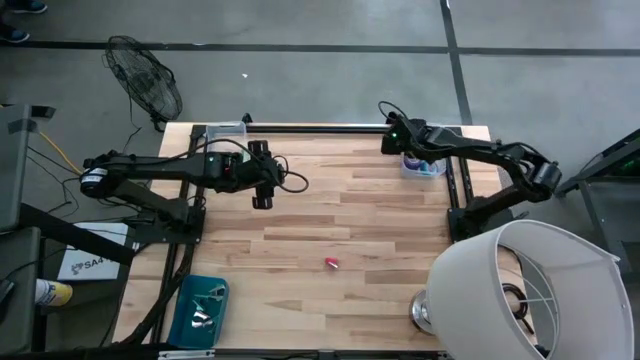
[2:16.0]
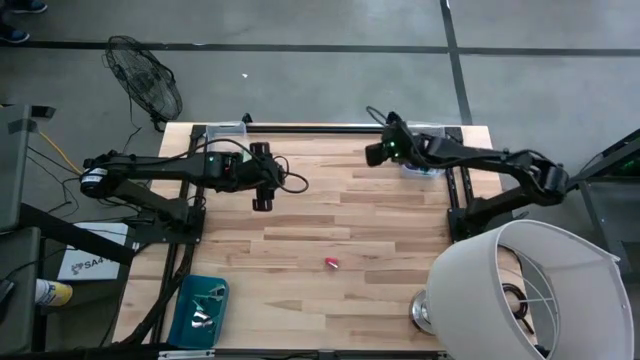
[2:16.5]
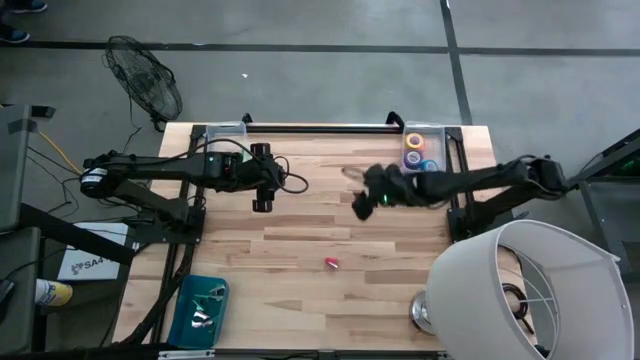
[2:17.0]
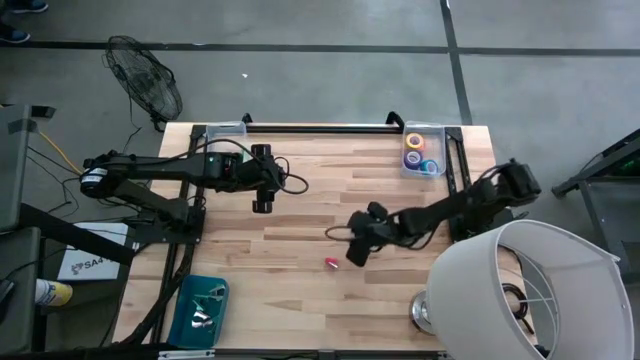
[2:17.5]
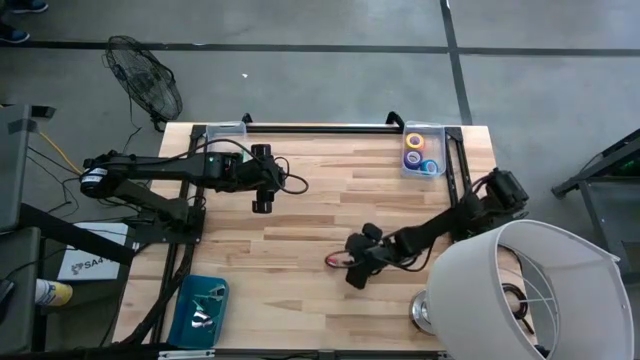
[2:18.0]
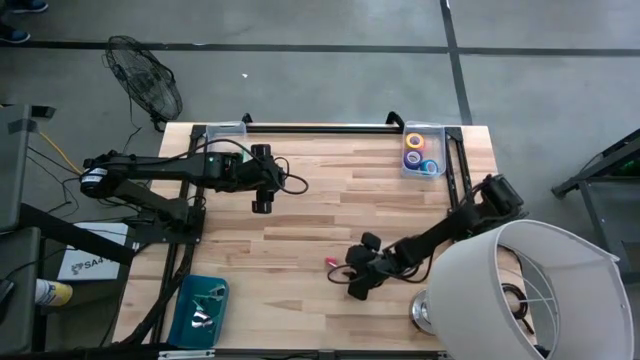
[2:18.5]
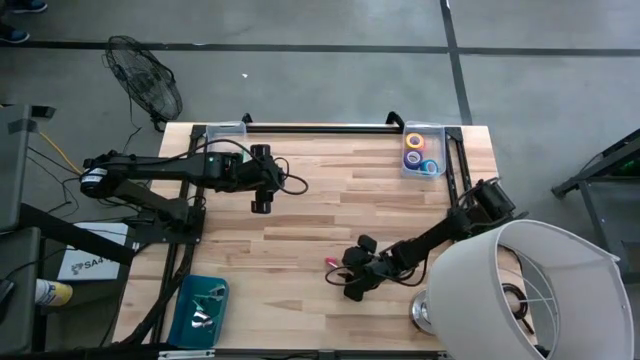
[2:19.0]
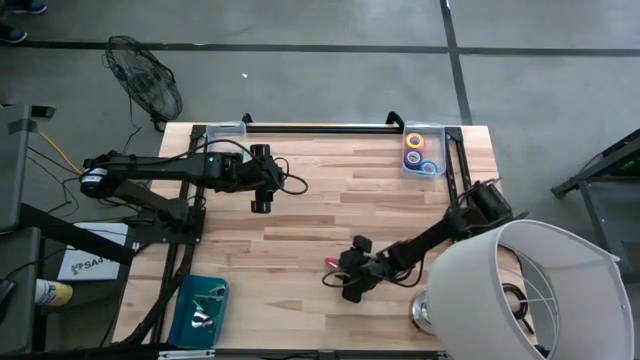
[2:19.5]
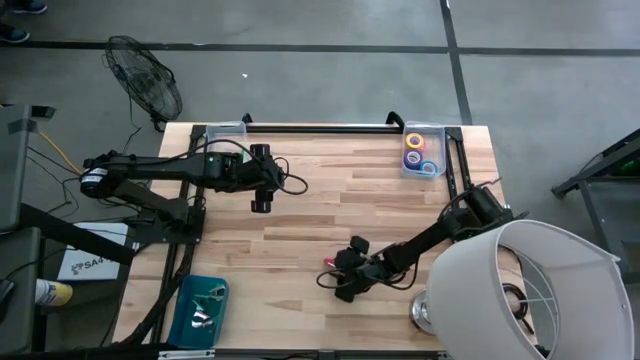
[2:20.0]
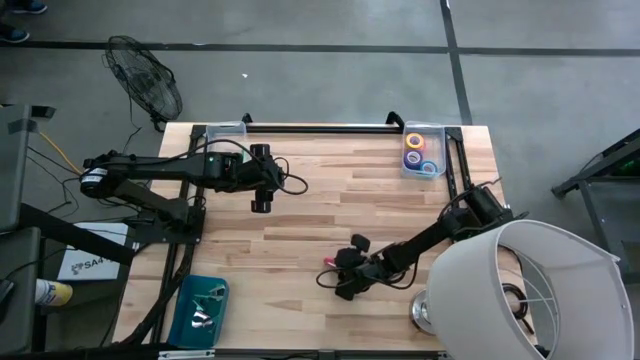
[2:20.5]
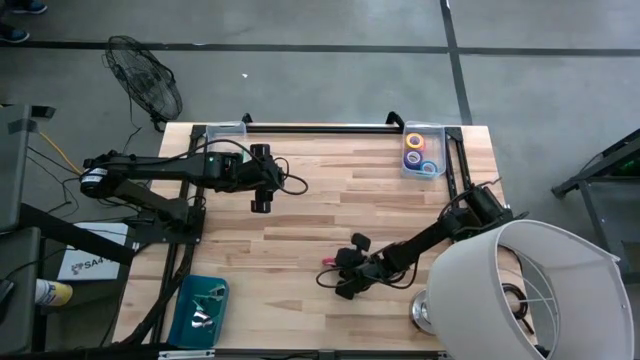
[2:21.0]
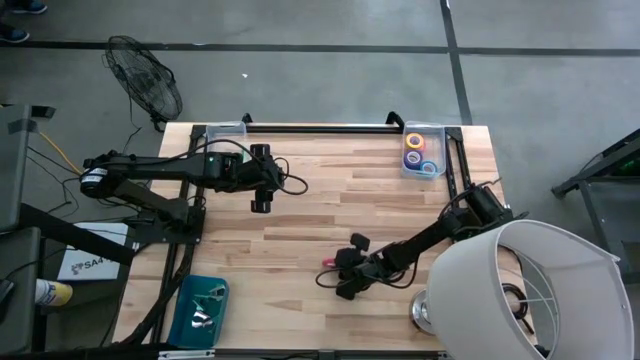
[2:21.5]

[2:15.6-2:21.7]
Task: Pick and place Stapler, Stapler remover, tape
Put the red stapler into the left transparent bin

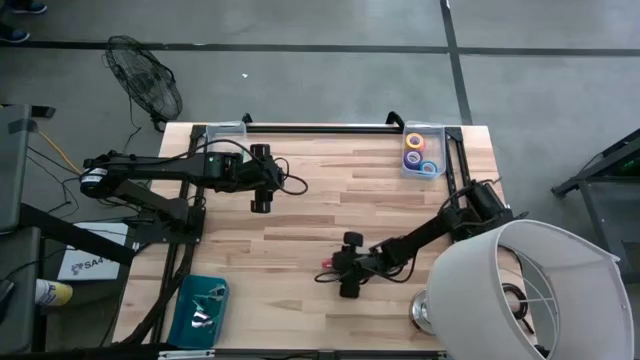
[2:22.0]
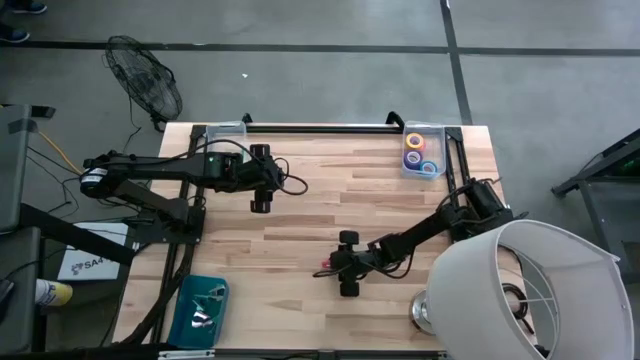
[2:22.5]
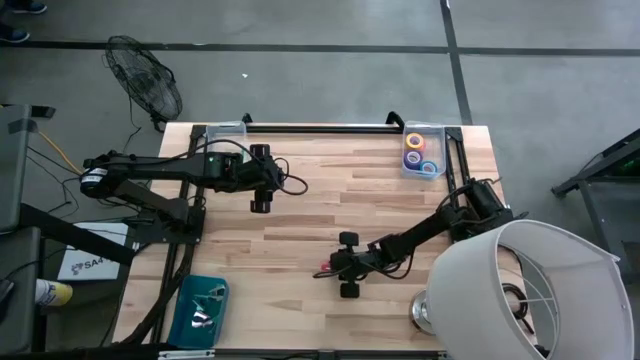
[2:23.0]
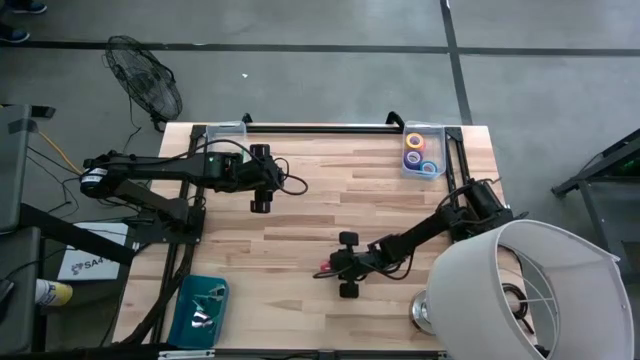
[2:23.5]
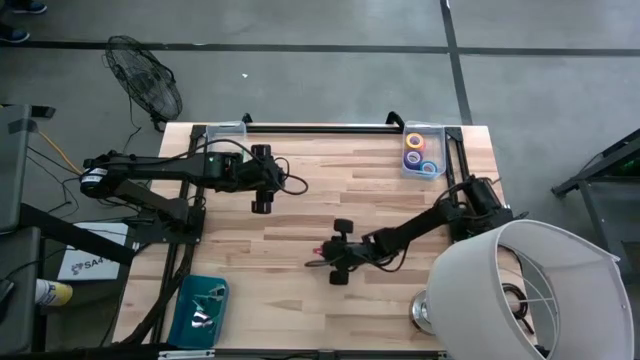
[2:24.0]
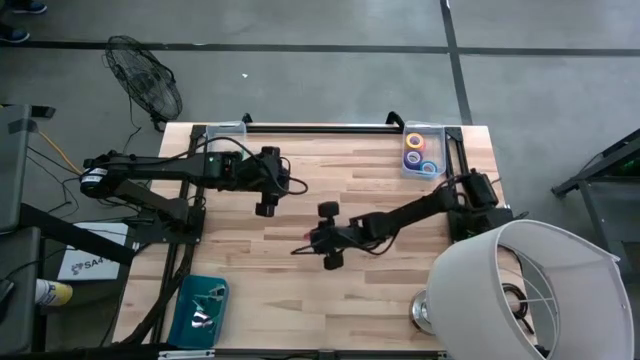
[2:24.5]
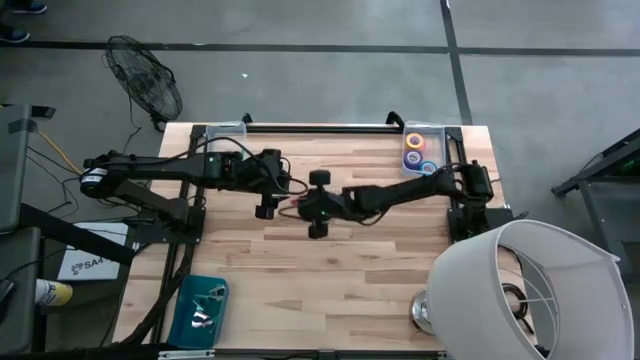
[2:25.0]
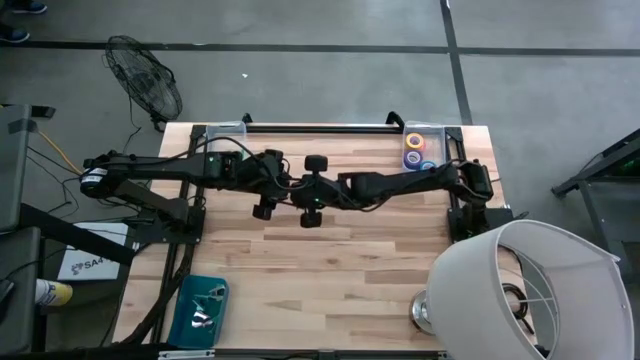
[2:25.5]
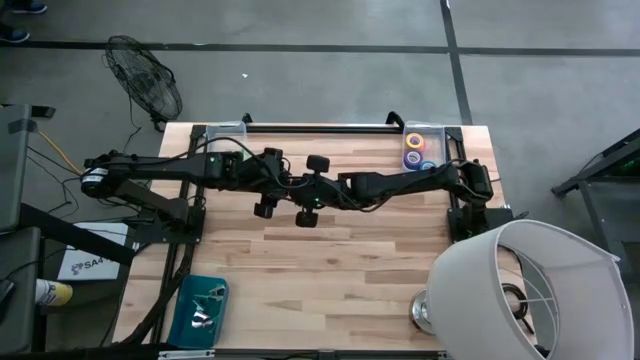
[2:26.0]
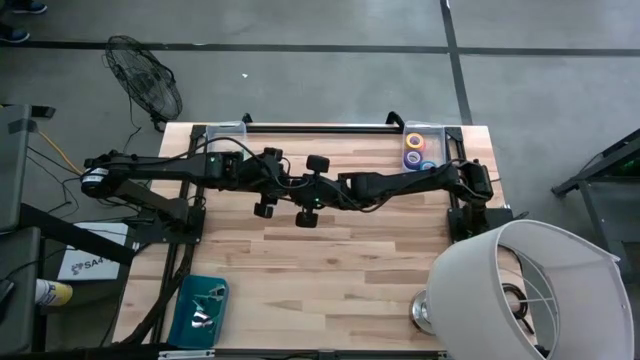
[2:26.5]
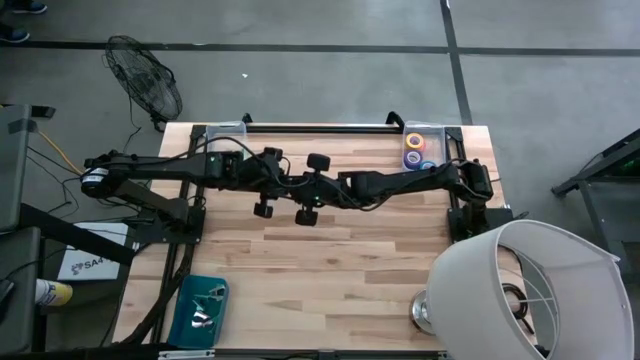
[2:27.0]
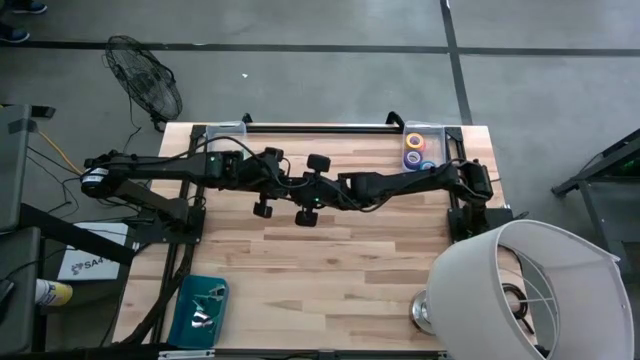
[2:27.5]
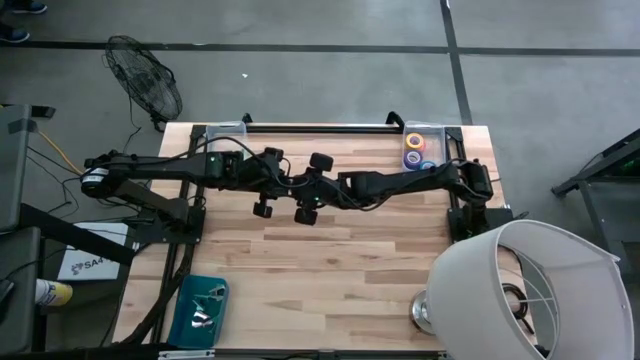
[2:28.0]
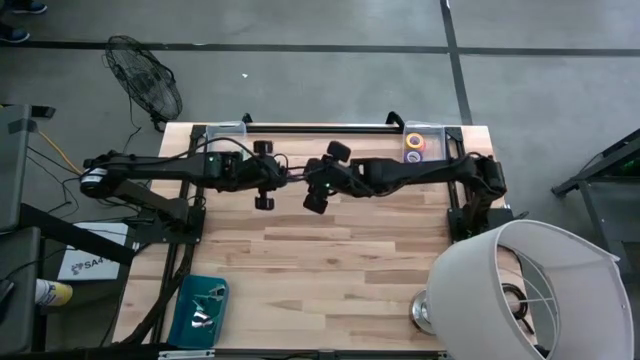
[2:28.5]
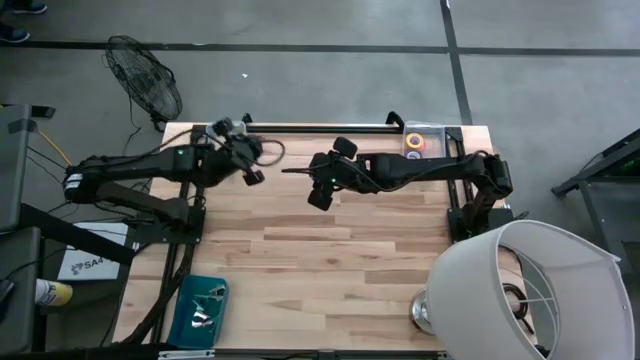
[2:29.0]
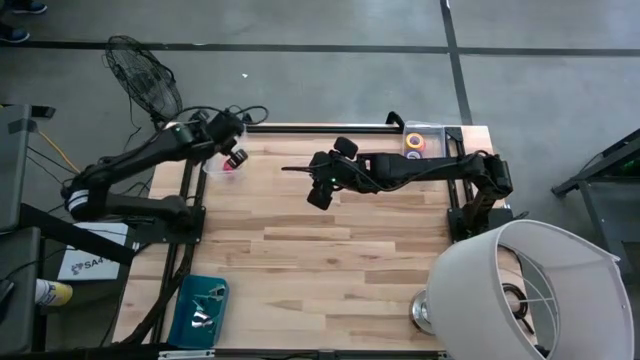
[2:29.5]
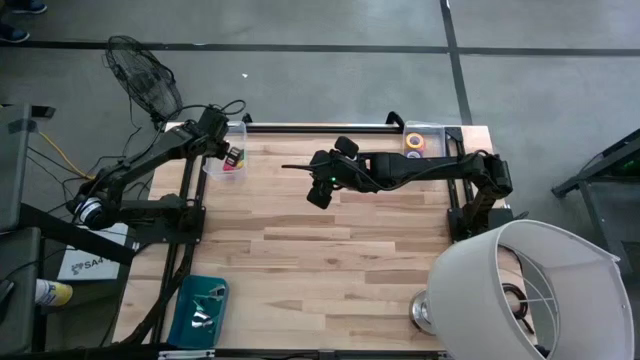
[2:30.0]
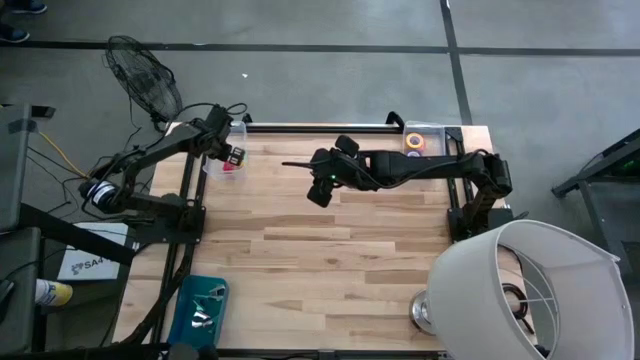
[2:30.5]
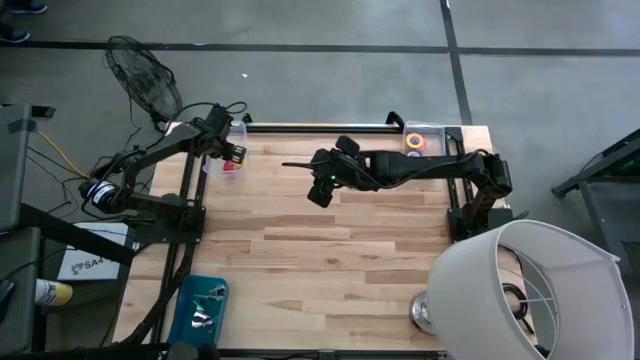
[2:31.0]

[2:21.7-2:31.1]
Put the red stapler into the left transparent bin

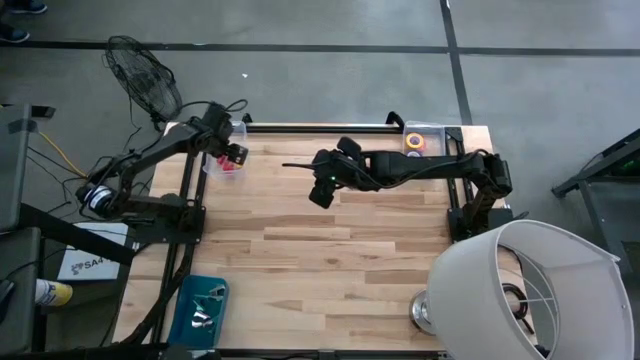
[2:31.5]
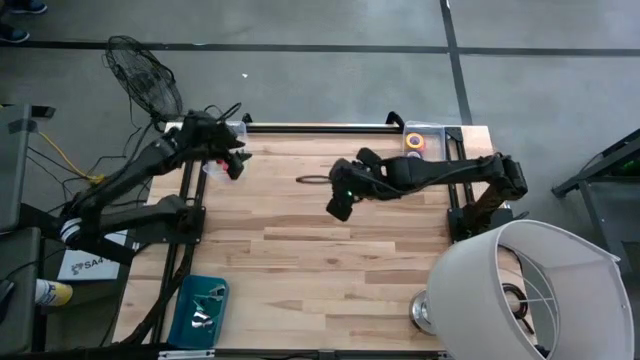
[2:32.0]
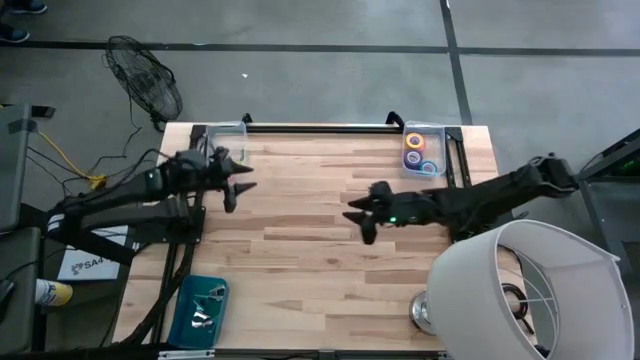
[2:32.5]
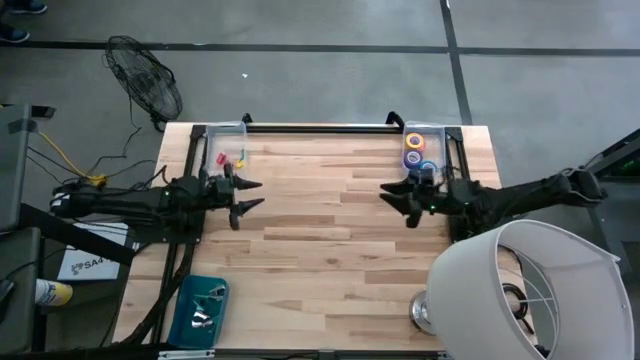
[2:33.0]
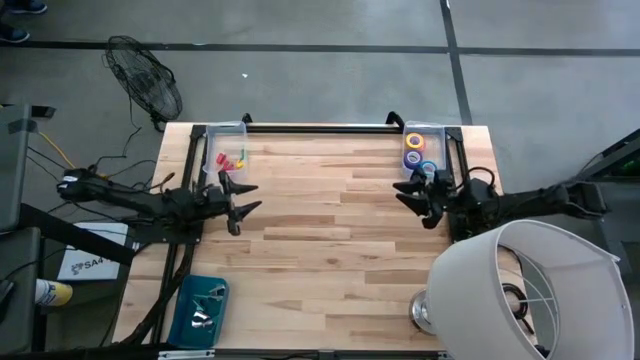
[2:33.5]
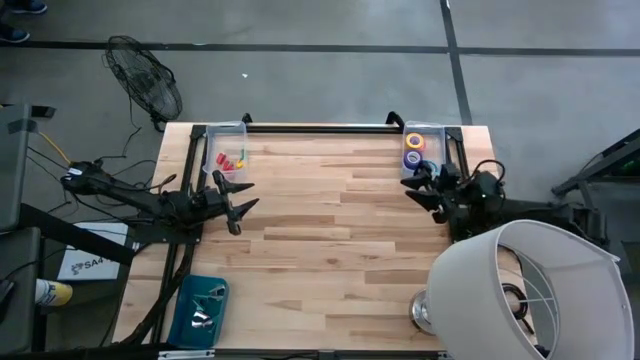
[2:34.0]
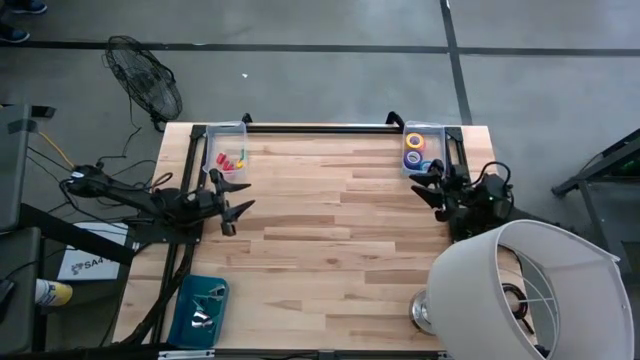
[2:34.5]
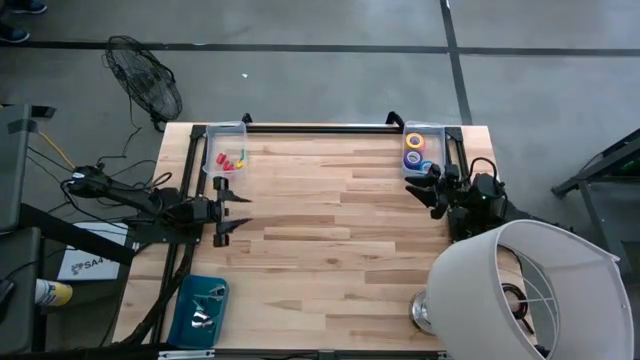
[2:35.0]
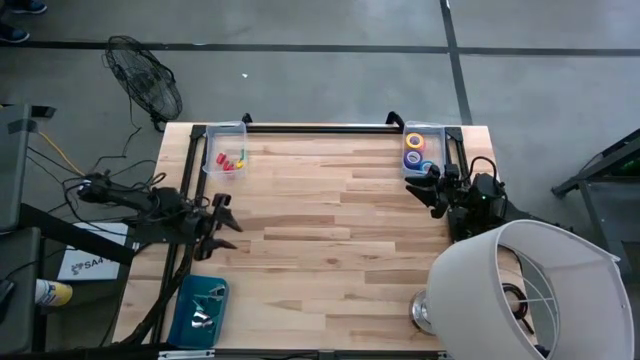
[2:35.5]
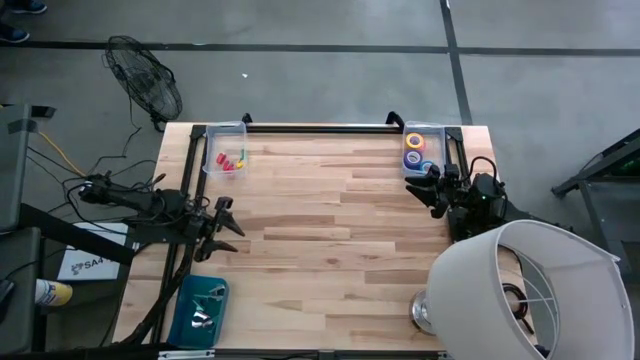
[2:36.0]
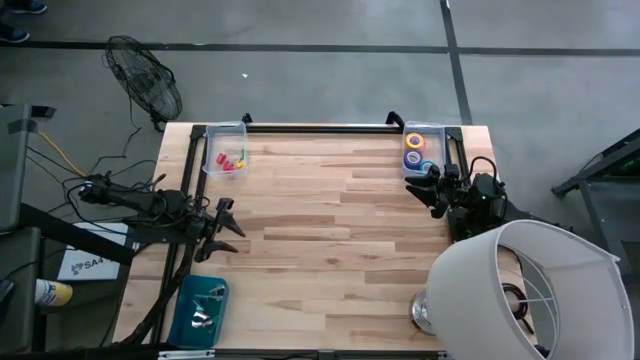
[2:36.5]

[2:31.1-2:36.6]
Return to Home Position

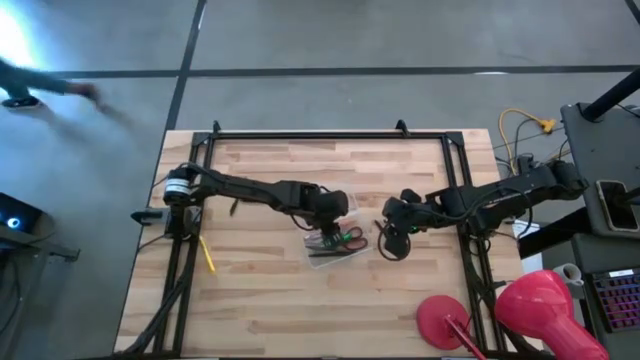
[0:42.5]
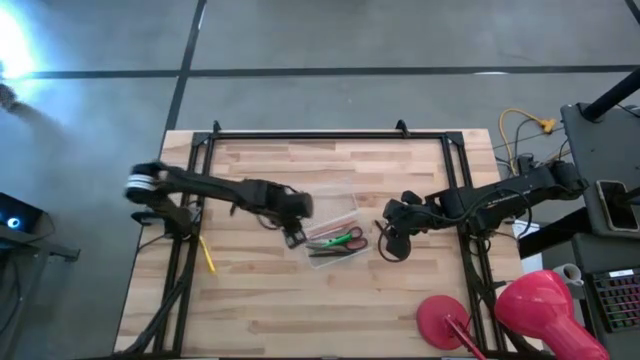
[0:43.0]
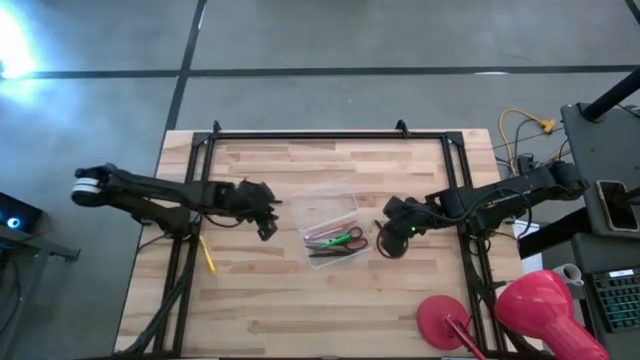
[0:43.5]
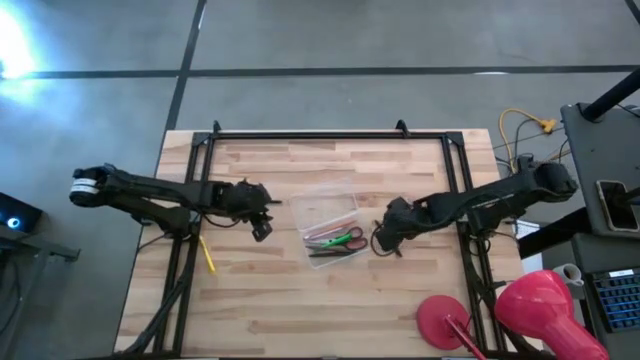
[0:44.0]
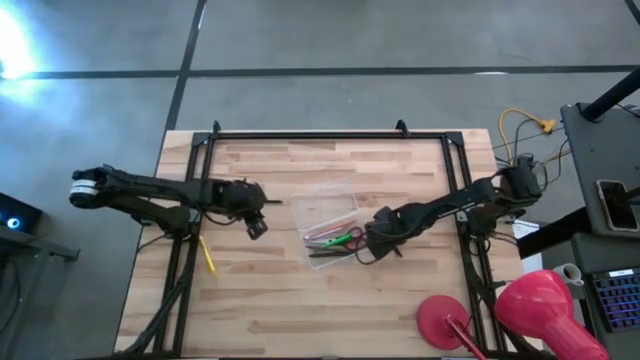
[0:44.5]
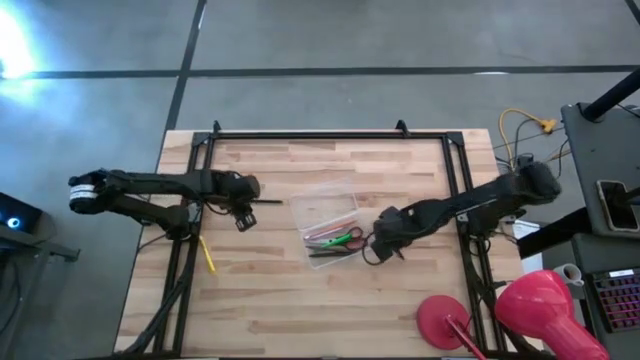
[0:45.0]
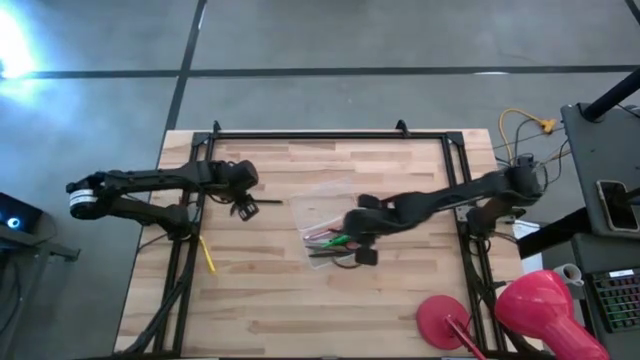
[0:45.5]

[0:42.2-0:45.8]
Task: Pick & place school supplies into a supply box
Put the black pen into the transparent supply box
